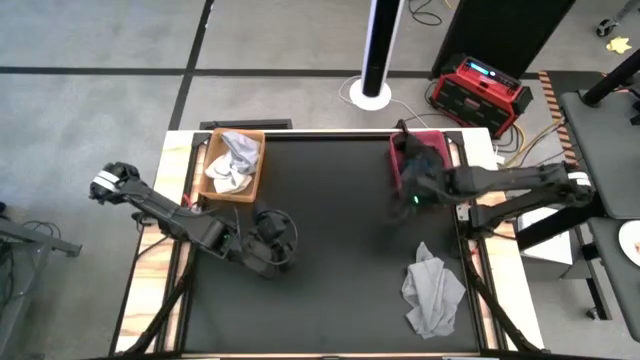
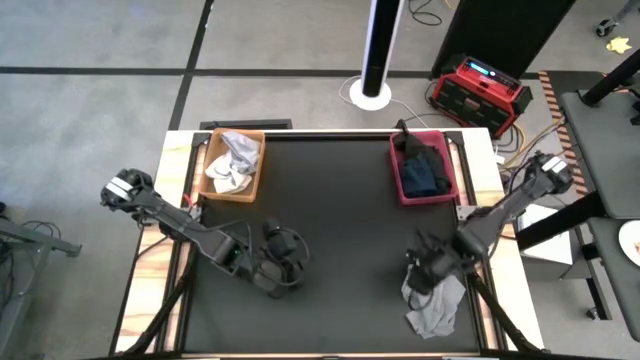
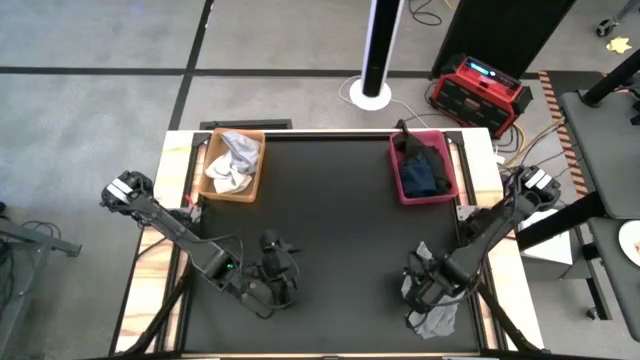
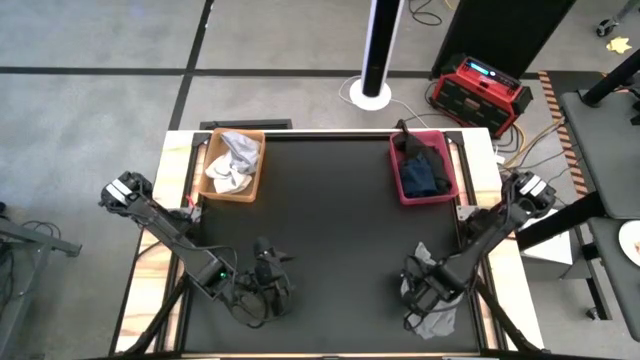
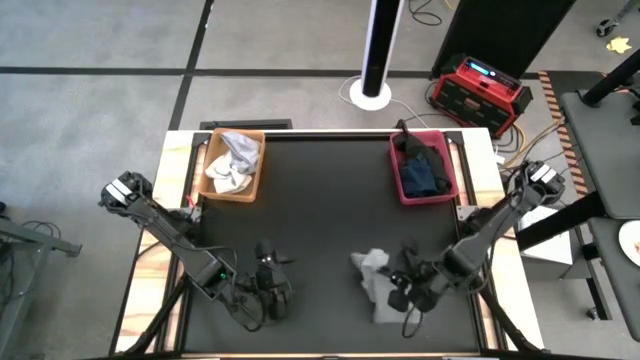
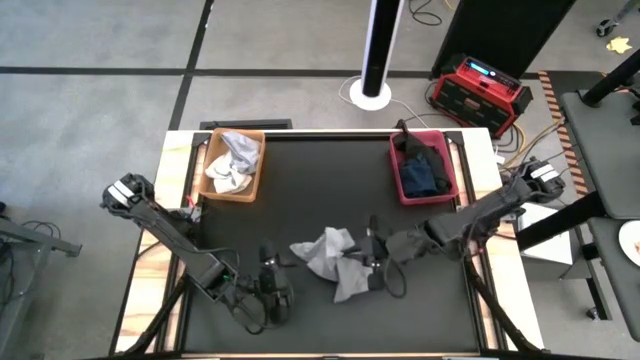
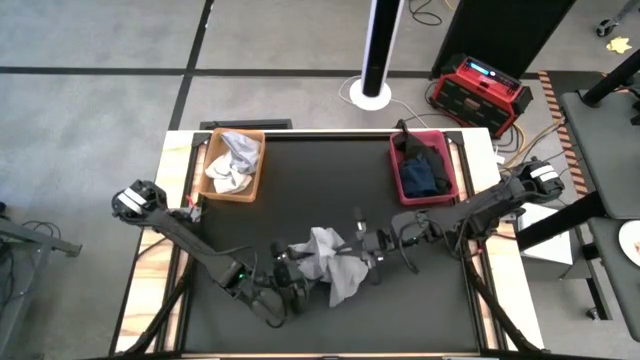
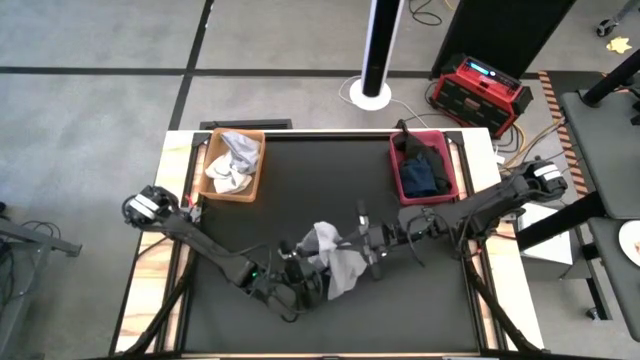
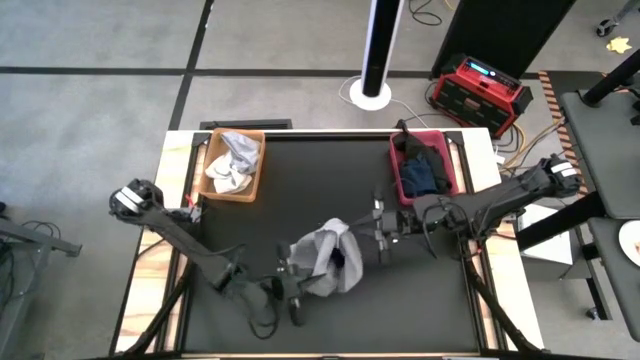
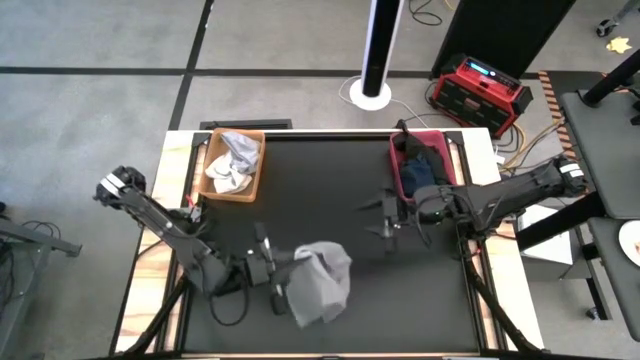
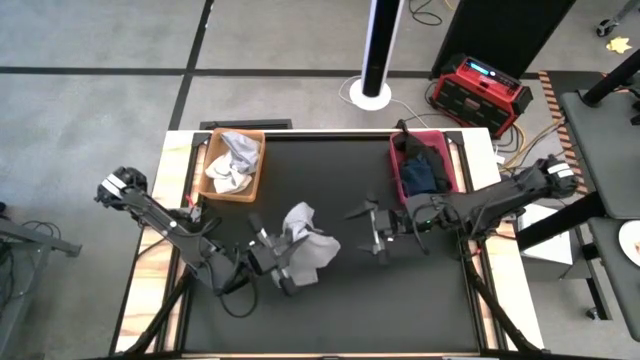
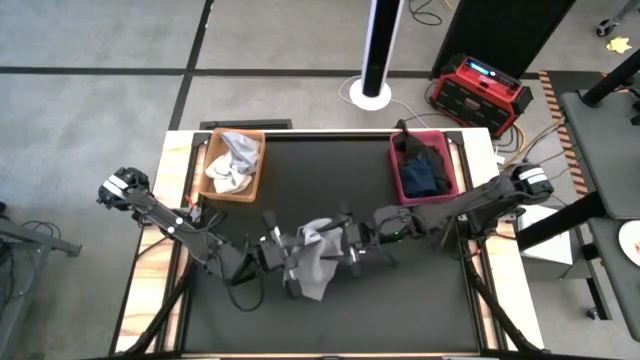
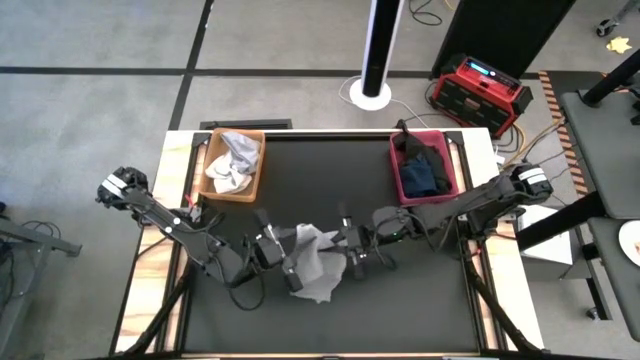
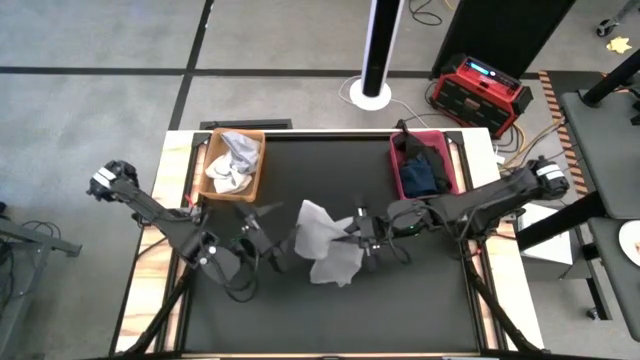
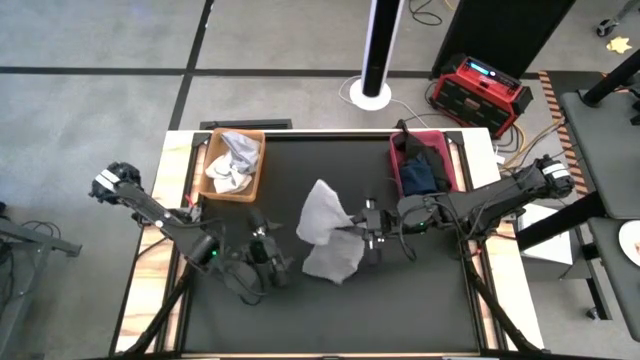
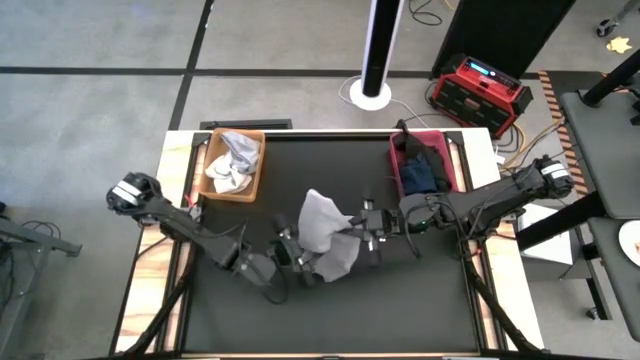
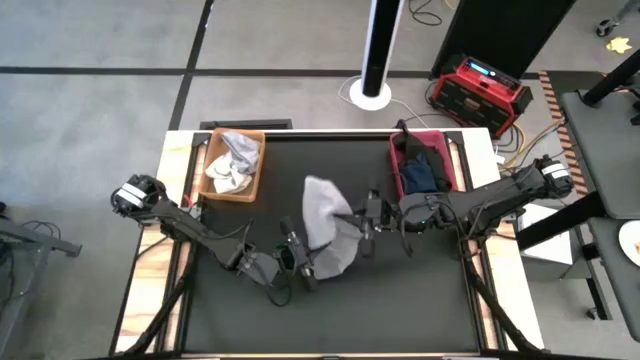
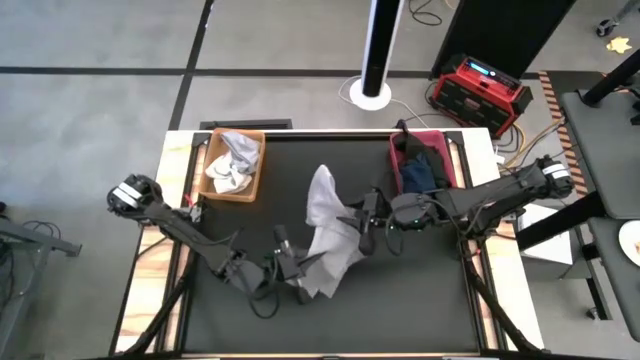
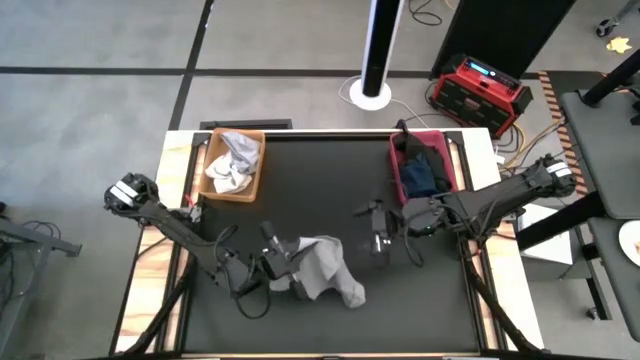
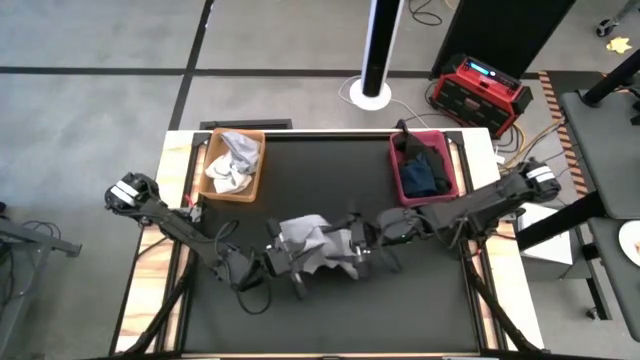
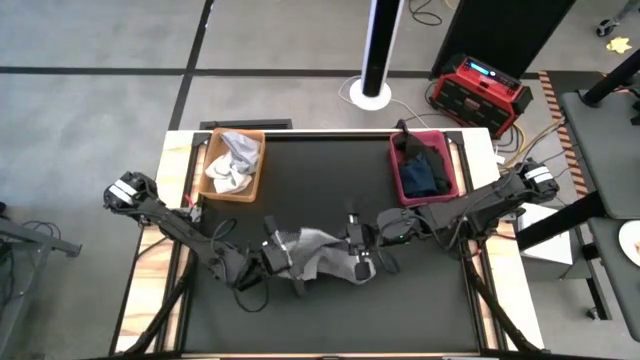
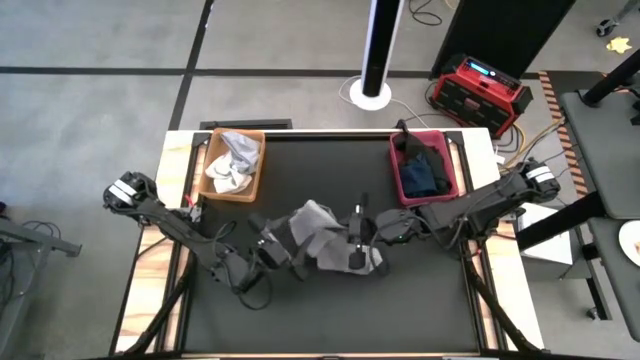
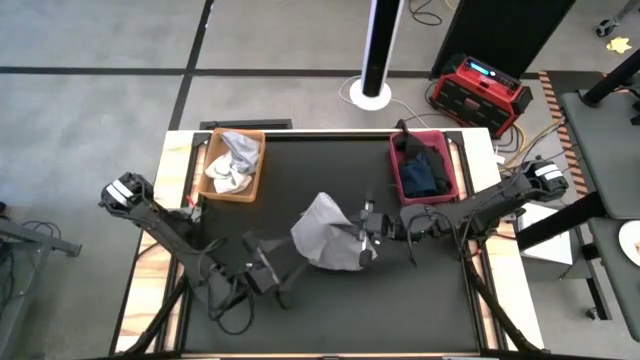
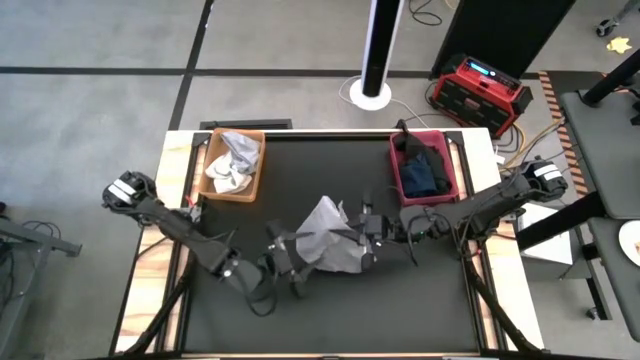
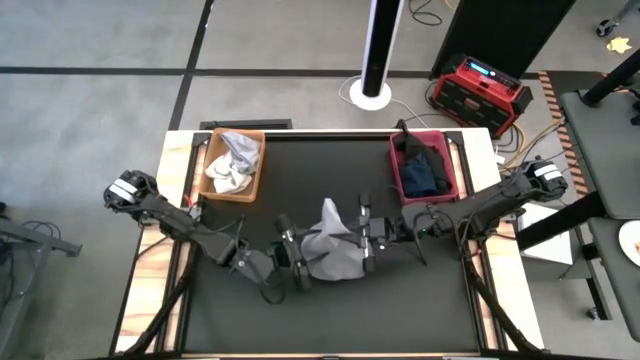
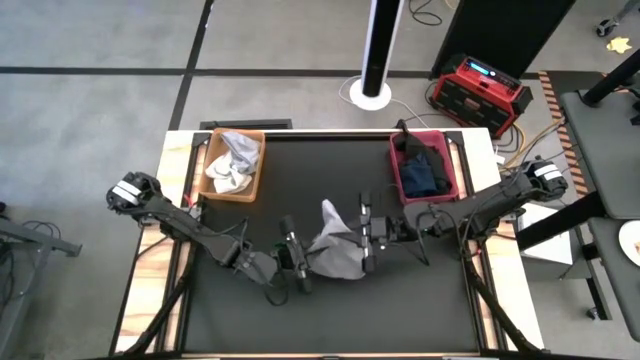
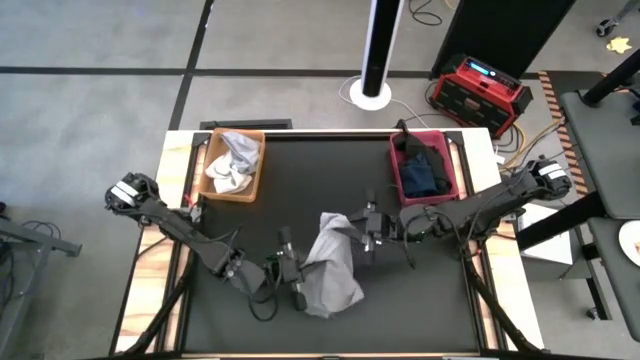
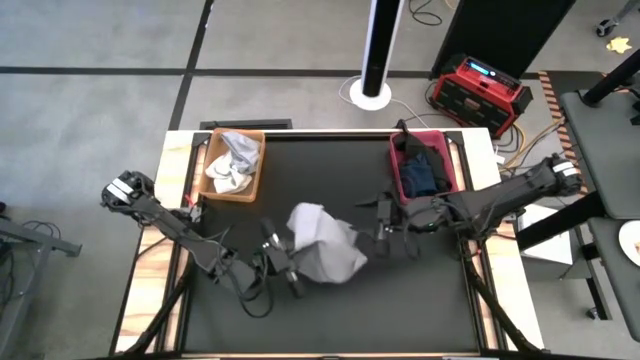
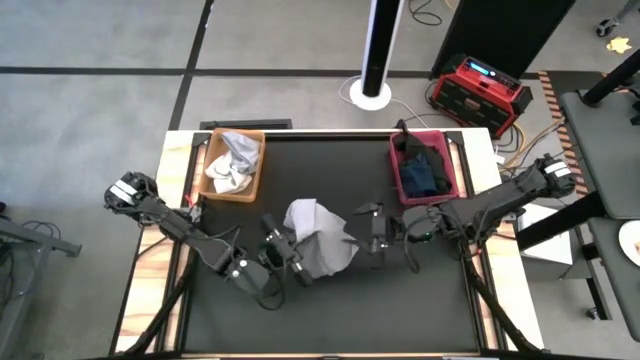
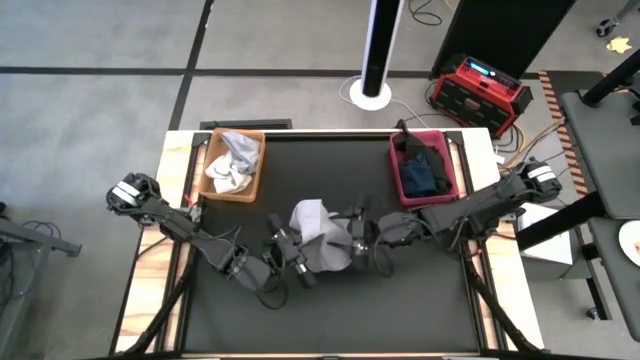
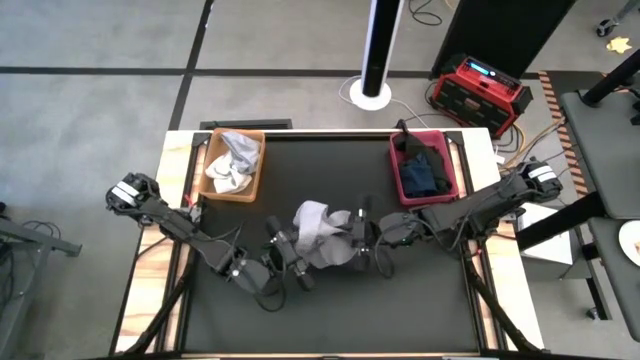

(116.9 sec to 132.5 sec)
Task: Sort towels by color in basket
Put the gray towel into the orange bin

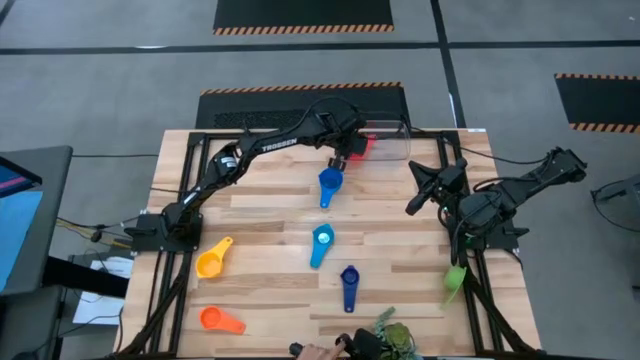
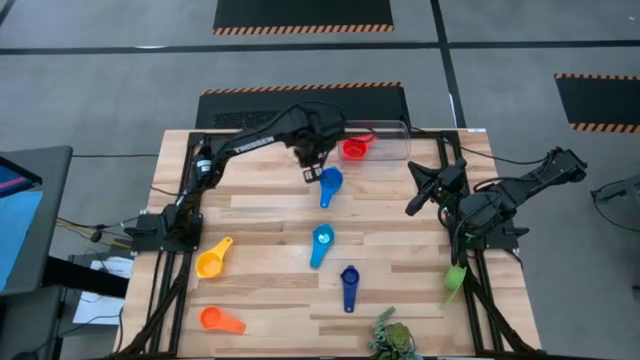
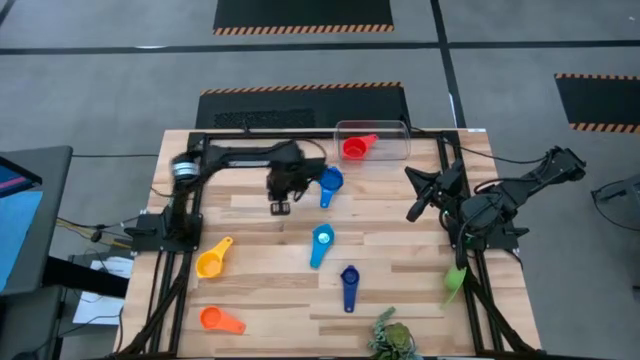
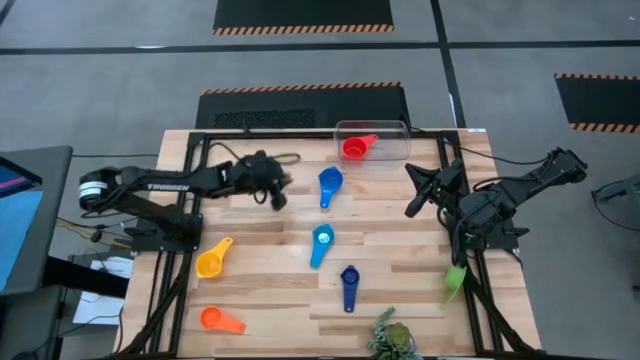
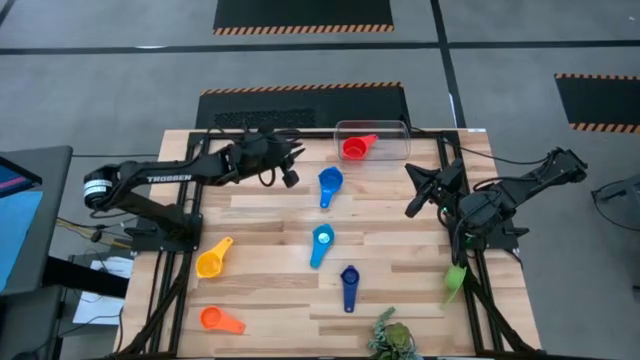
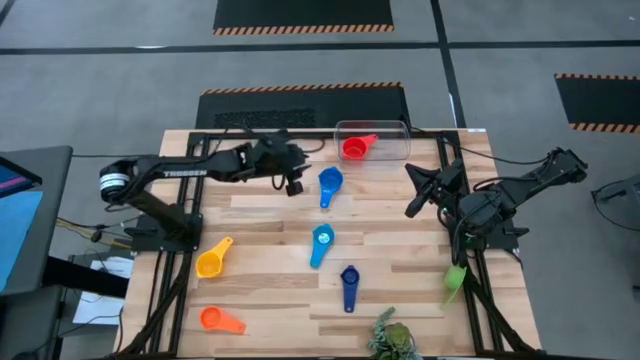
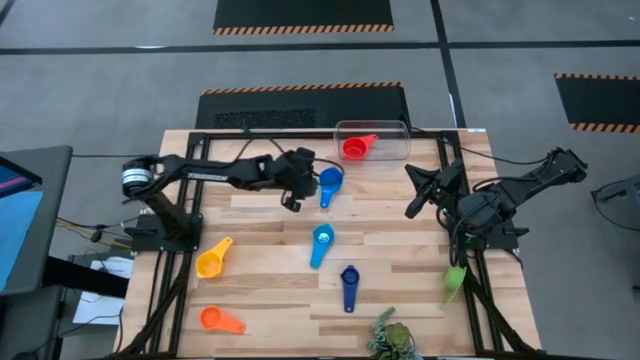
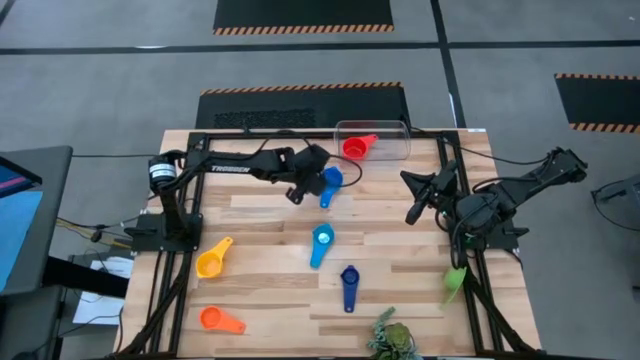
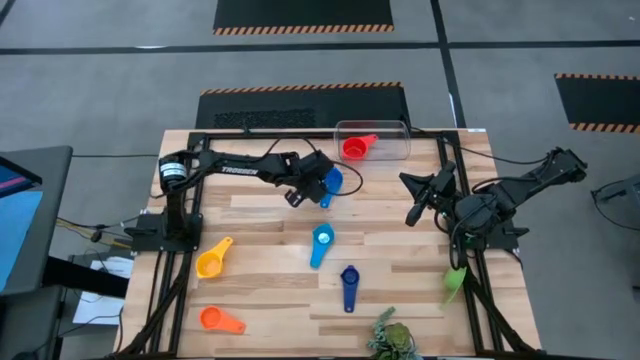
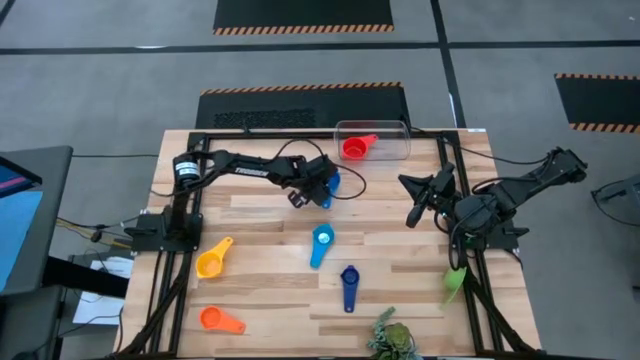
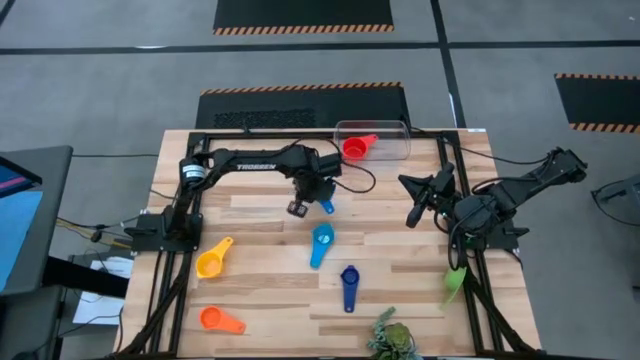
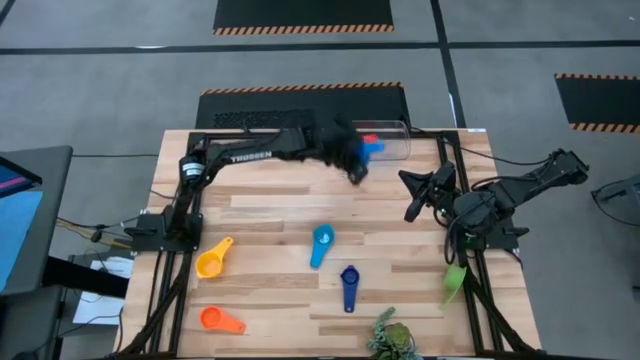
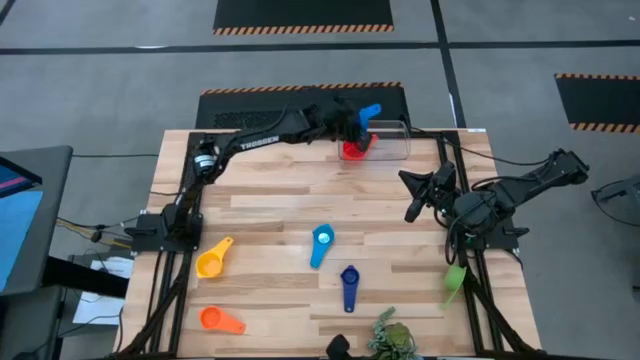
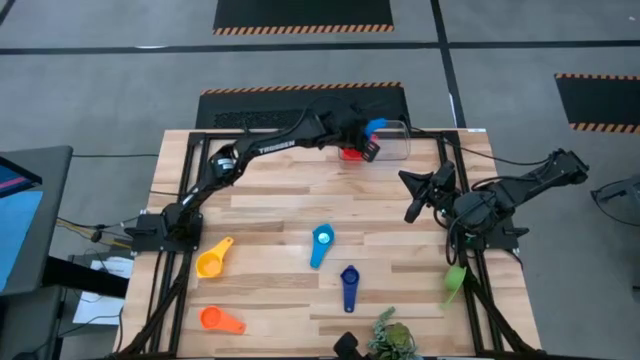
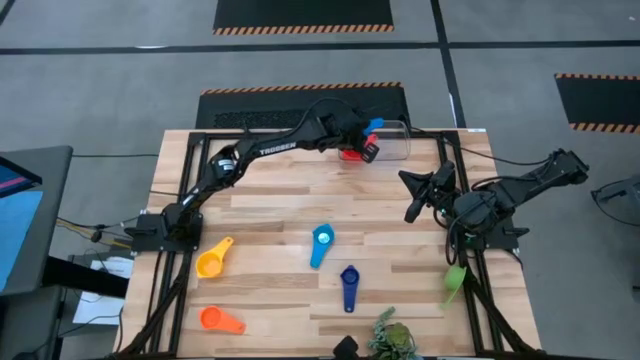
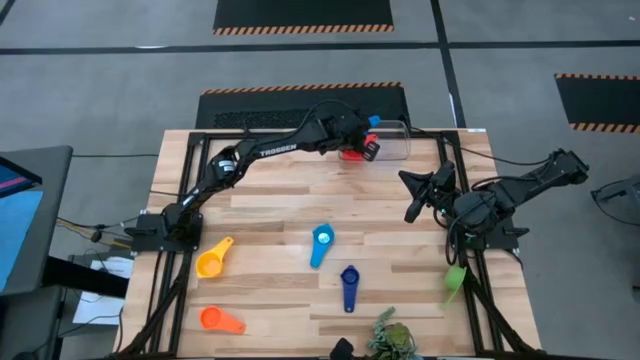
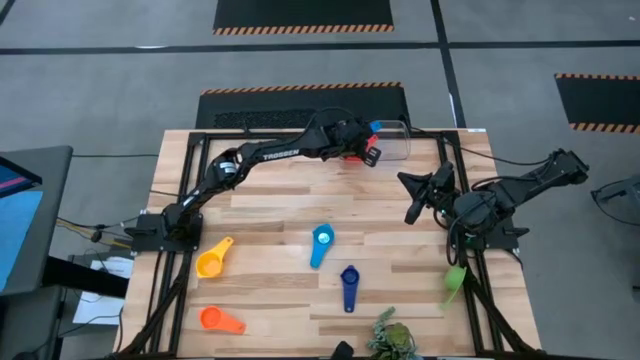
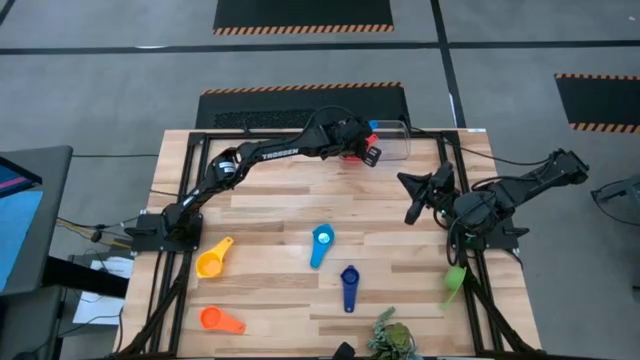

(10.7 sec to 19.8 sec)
Task: Nest measuring cups in basket
Stack the blue measuring cup on top of the red measuring cup in the transparent bin
